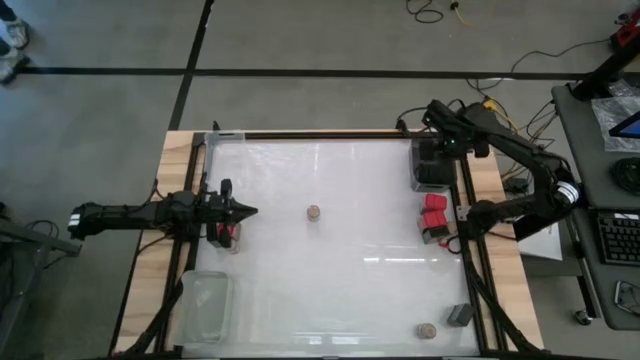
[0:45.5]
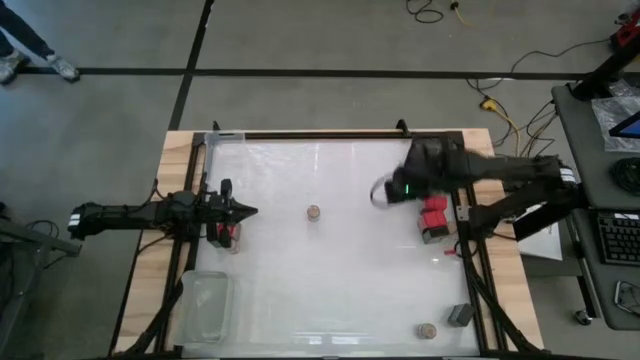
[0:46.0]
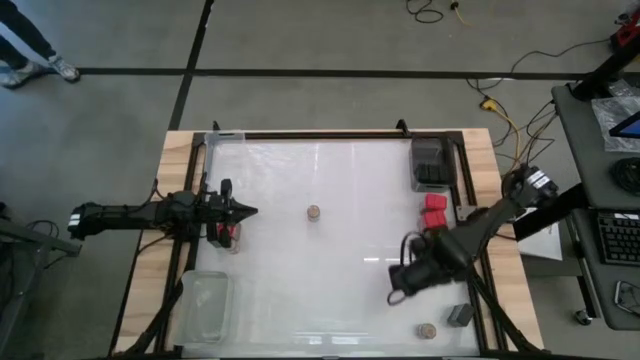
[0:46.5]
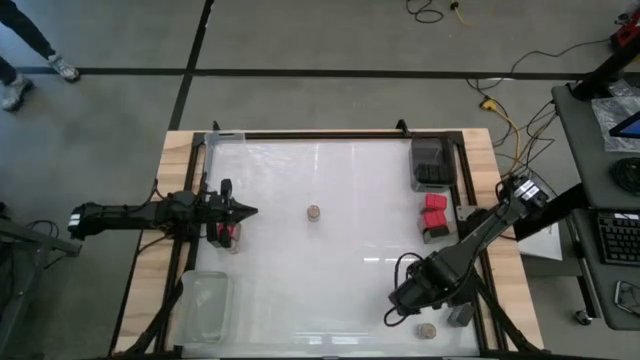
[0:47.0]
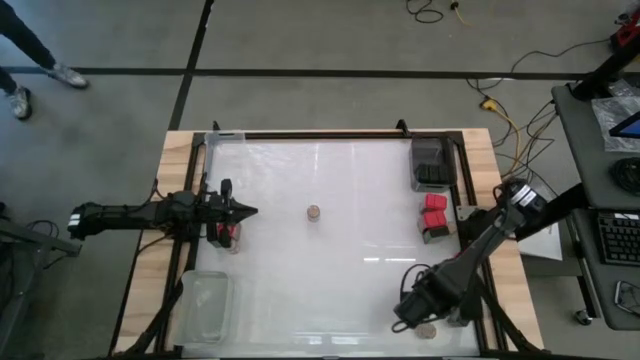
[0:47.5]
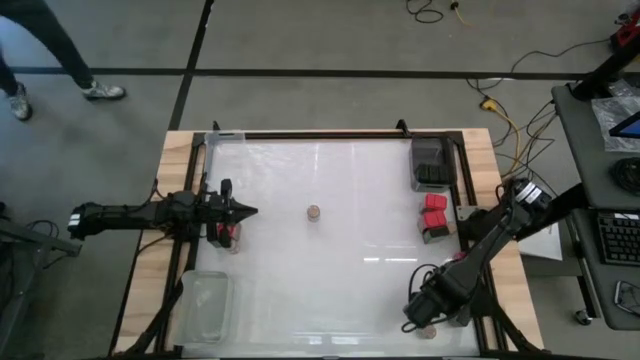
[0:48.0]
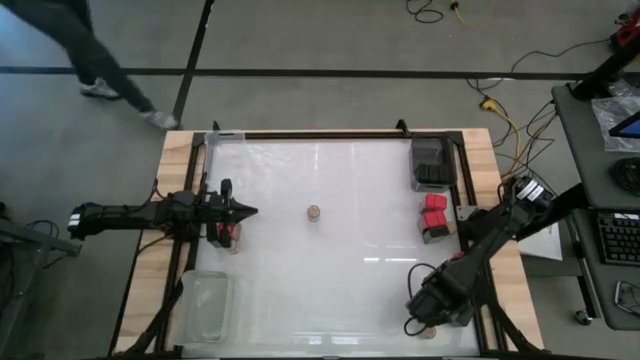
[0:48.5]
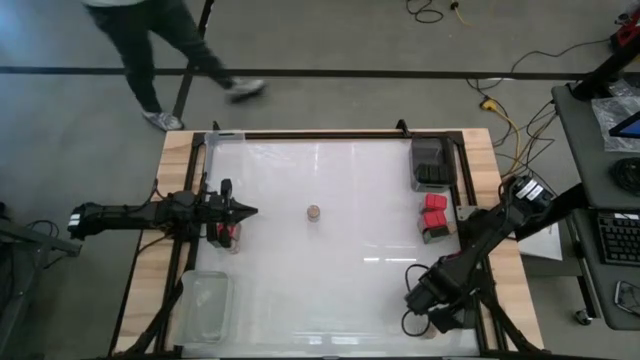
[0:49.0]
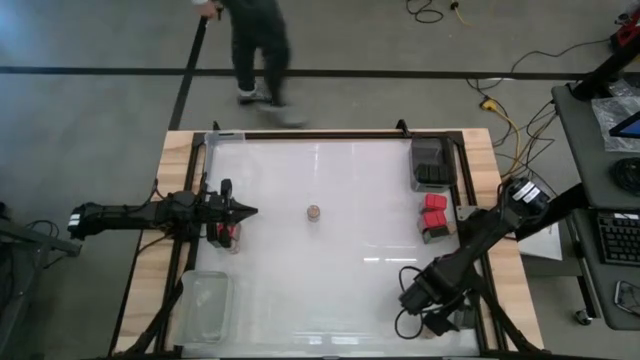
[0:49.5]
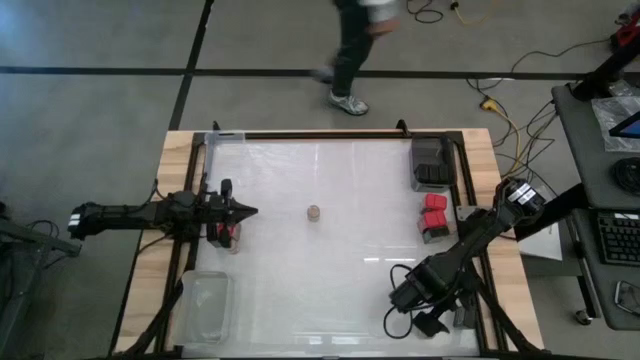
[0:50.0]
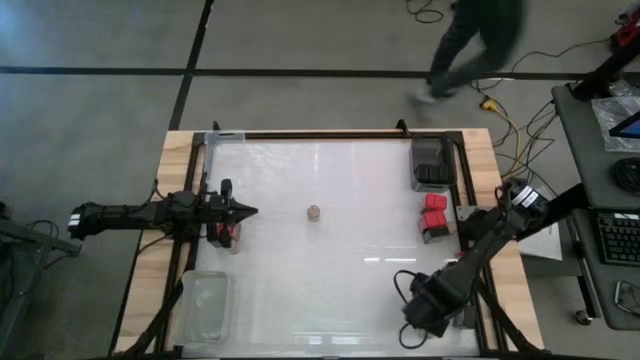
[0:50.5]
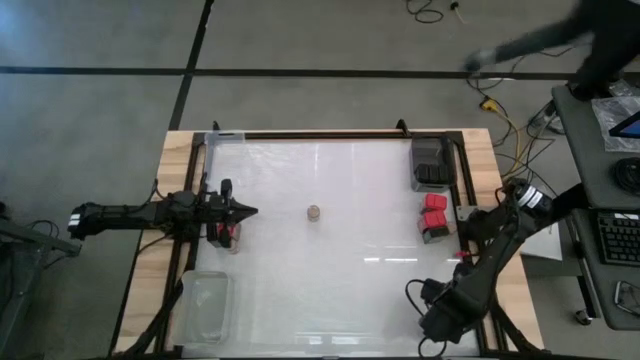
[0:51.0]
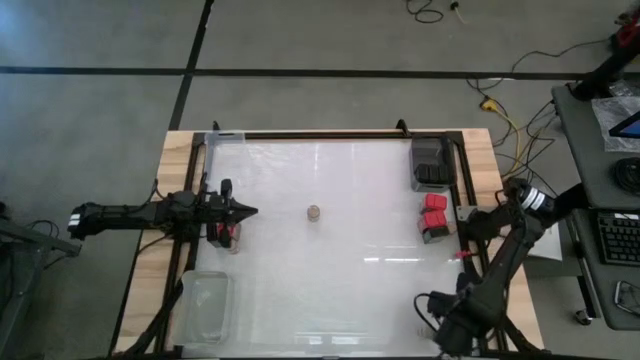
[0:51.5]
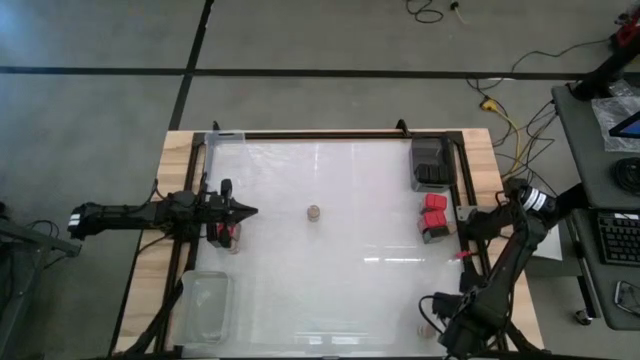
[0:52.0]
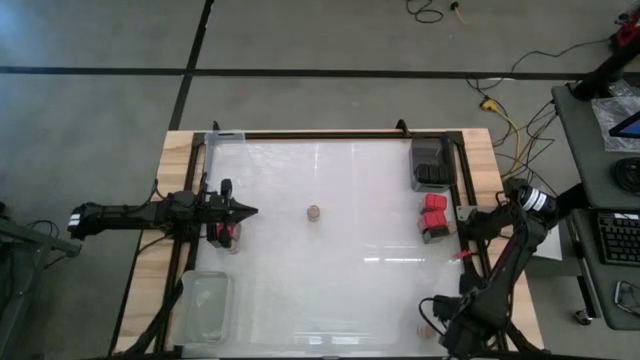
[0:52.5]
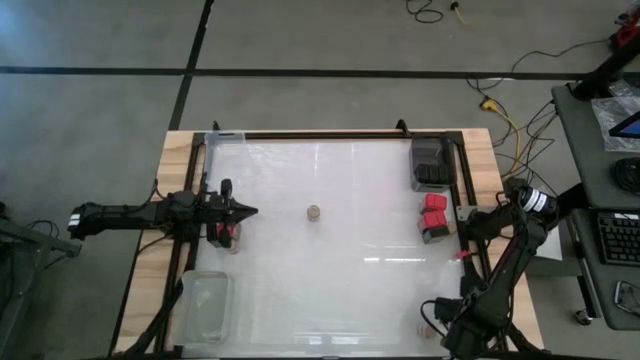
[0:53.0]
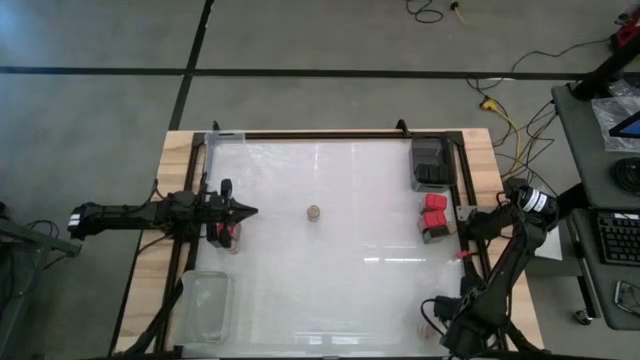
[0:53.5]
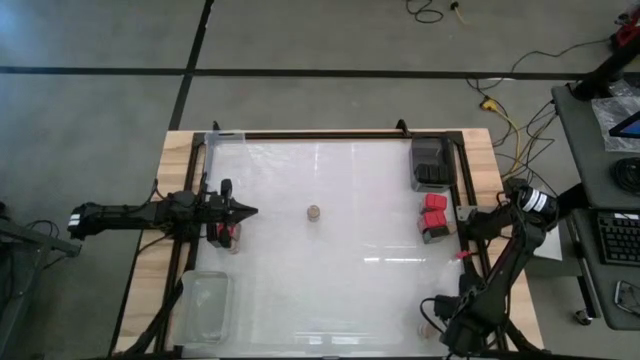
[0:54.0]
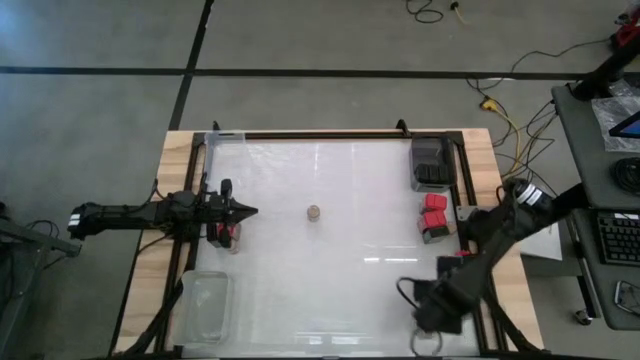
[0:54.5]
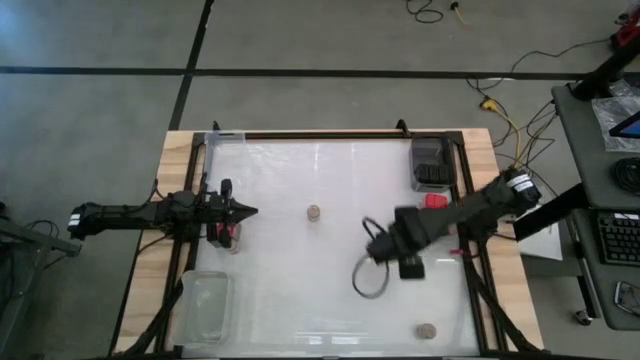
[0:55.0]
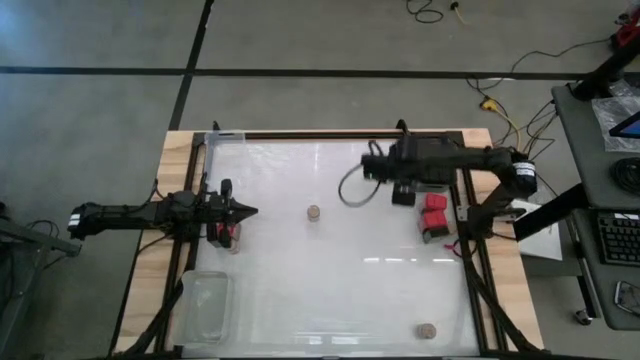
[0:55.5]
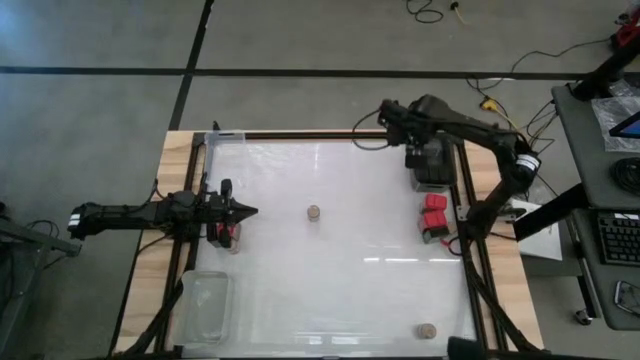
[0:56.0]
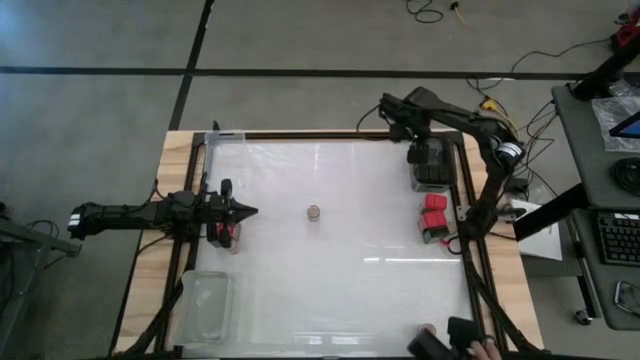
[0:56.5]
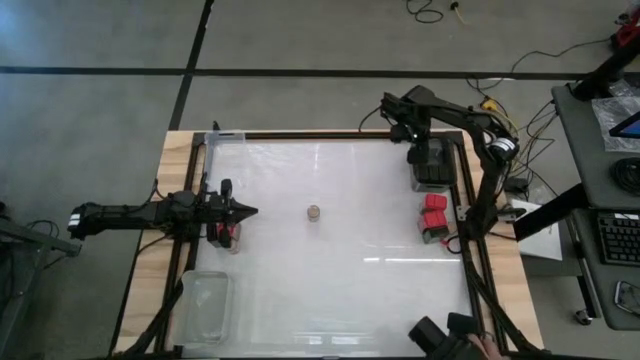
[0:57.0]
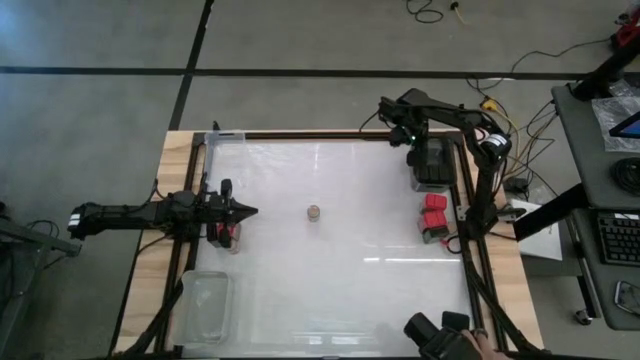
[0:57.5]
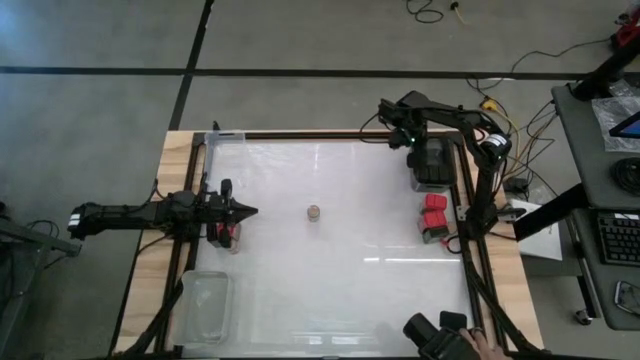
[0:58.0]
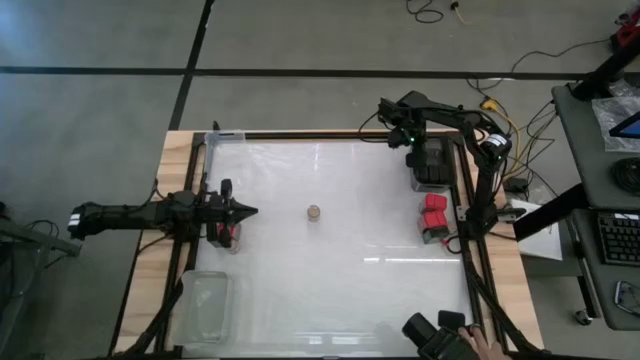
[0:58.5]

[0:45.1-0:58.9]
Task: Sort spices by type
Put the black seasoning can into the black bin

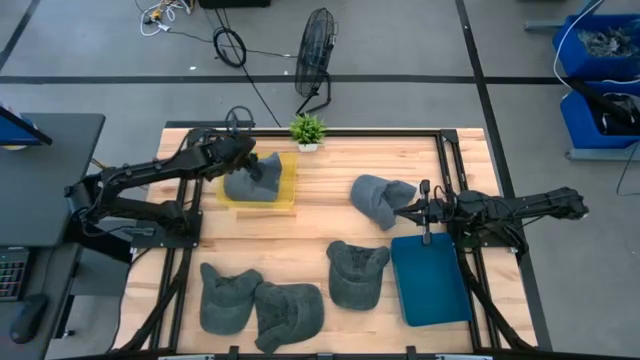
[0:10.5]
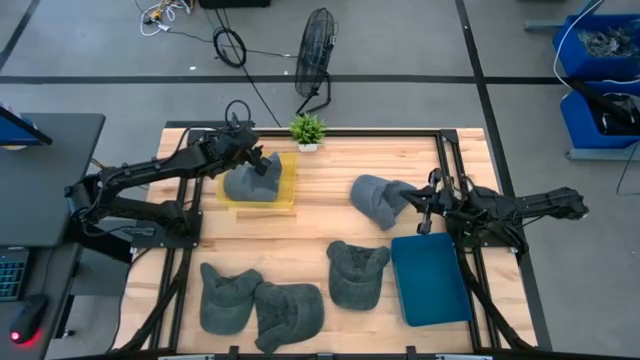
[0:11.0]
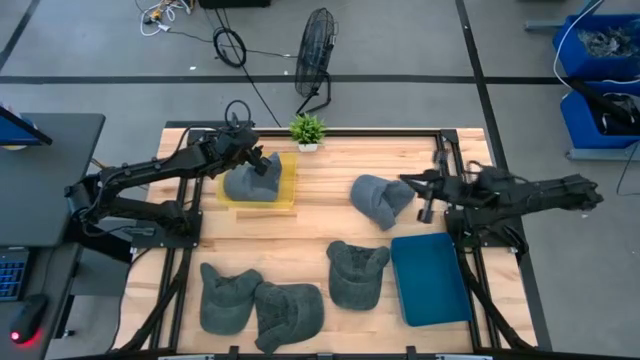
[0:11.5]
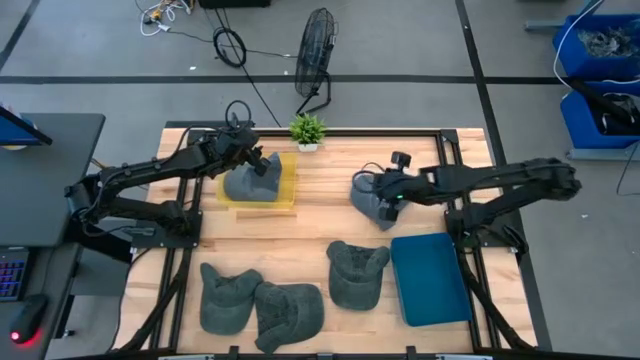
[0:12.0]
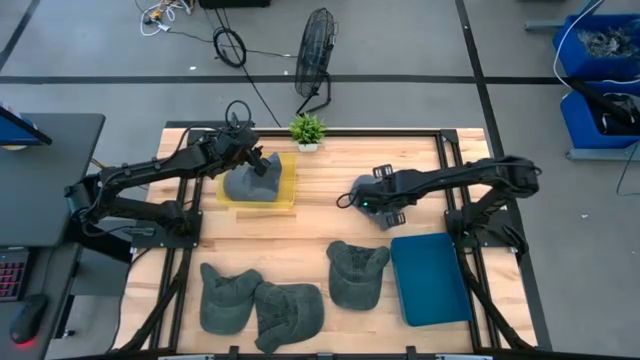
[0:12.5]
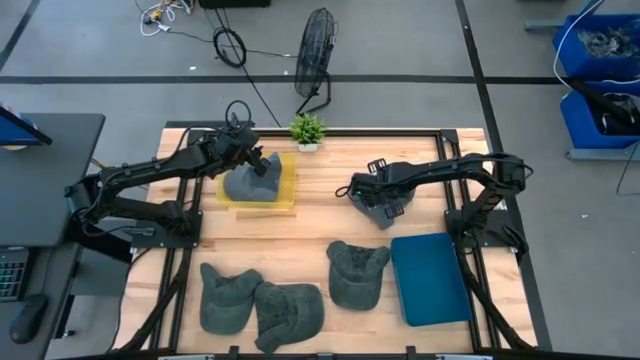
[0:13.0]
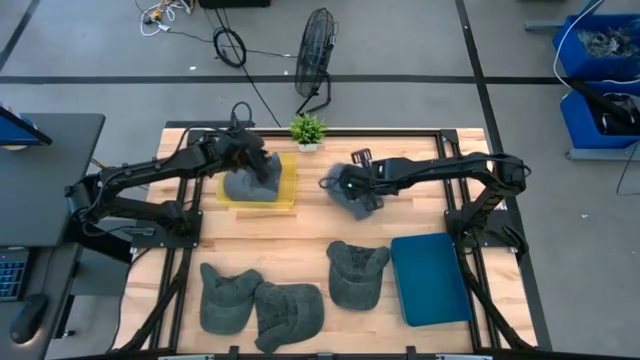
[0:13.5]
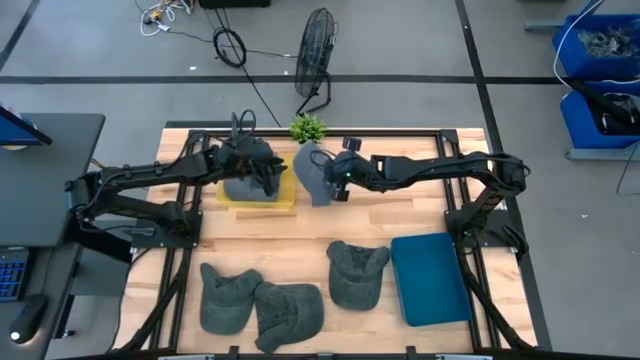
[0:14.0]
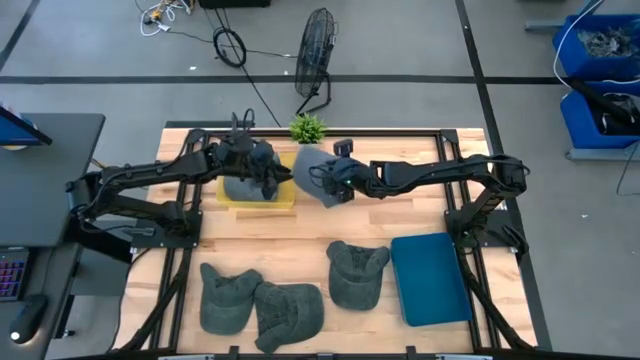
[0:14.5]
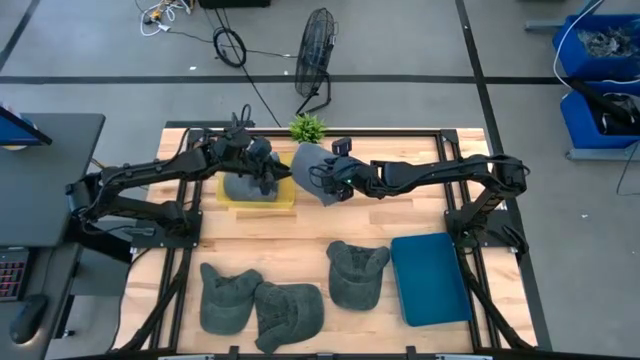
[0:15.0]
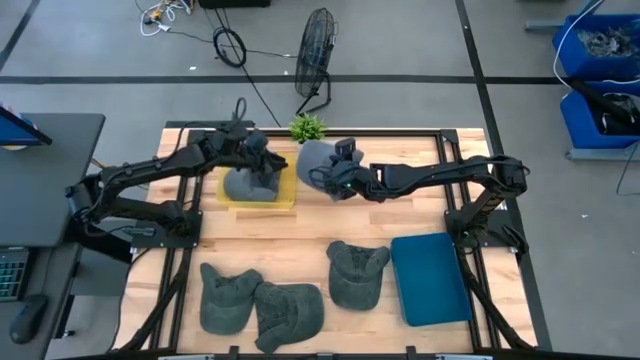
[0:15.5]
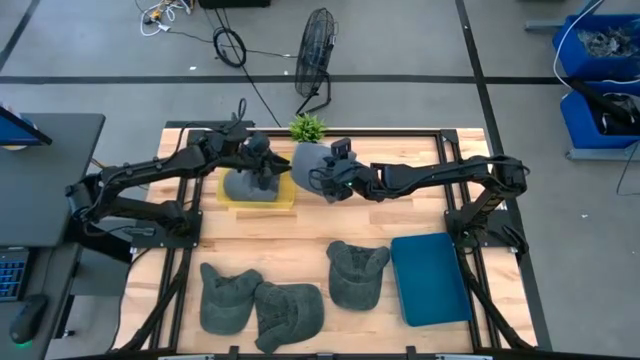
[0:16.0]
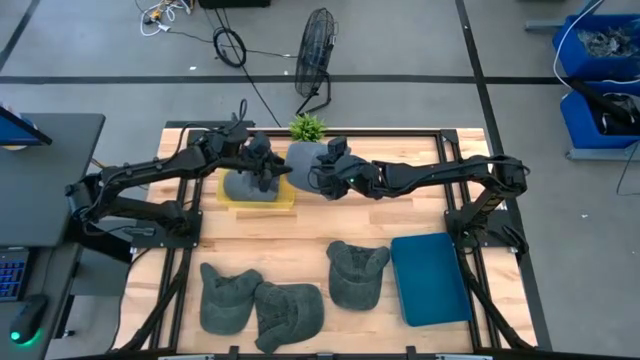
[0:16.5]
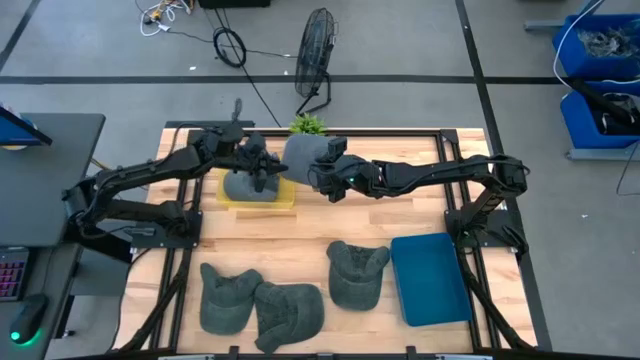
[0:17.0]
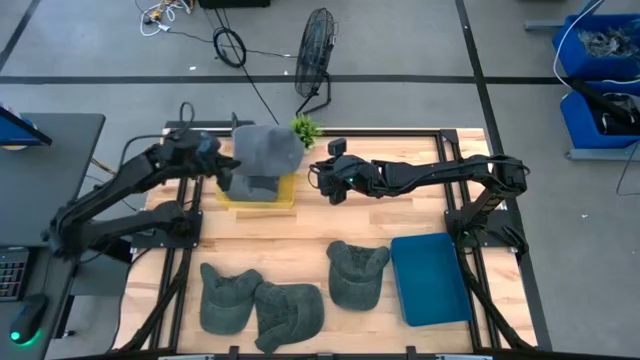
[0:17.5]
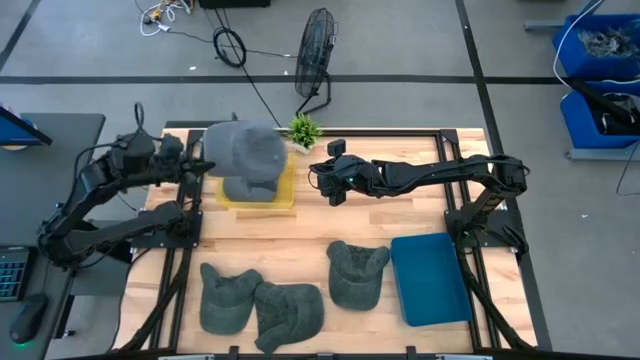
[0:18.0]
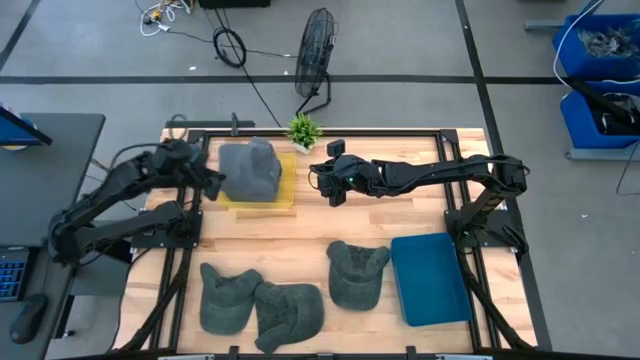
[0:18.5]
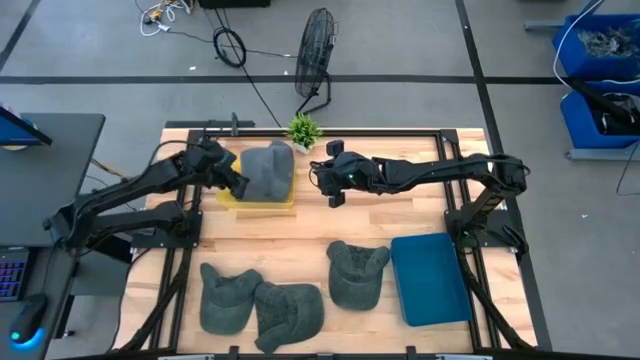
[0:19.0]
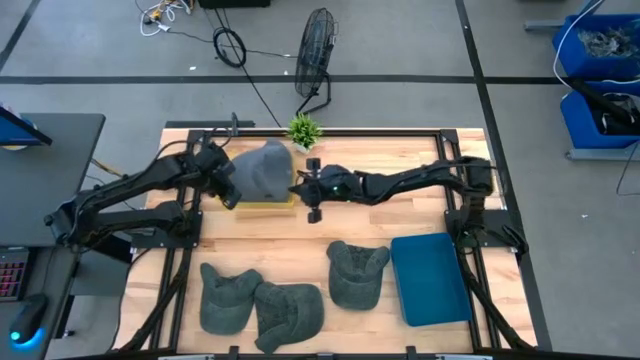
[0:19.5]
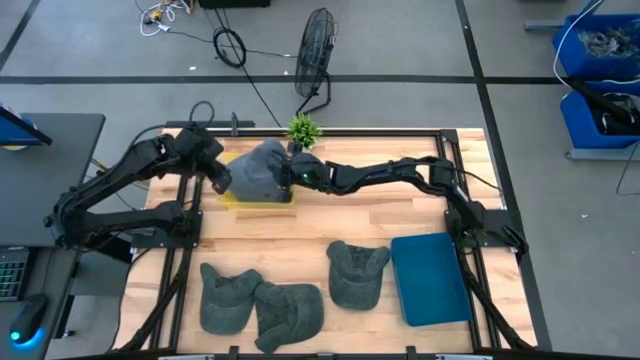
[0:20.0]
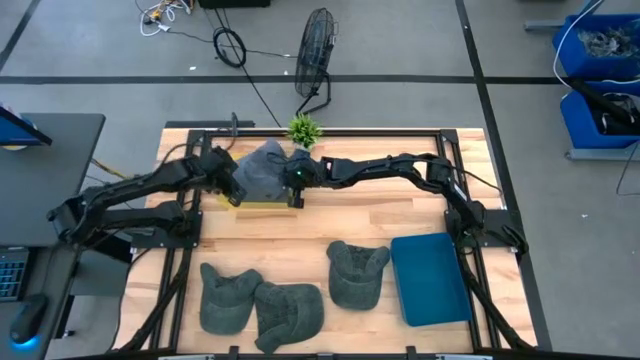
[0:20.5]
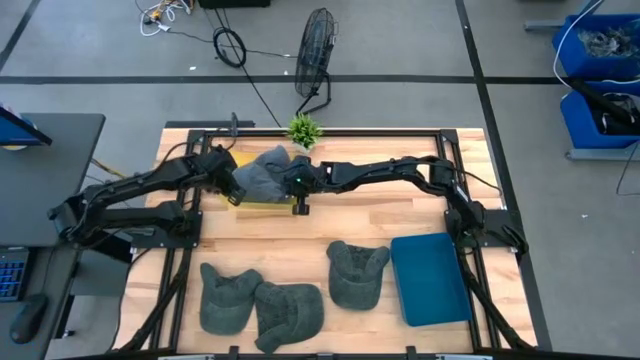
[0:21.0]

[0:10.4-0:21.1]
Task: Pick & Place hat
Put the blue cap into the yellow bin
